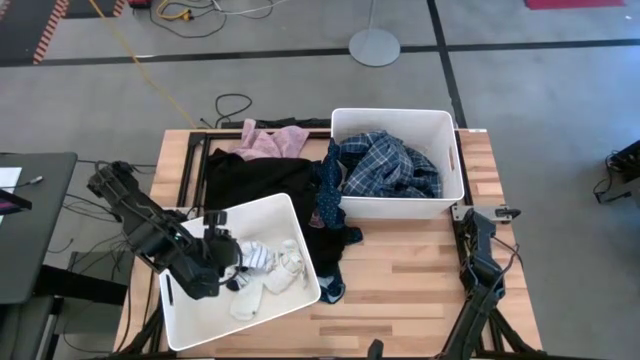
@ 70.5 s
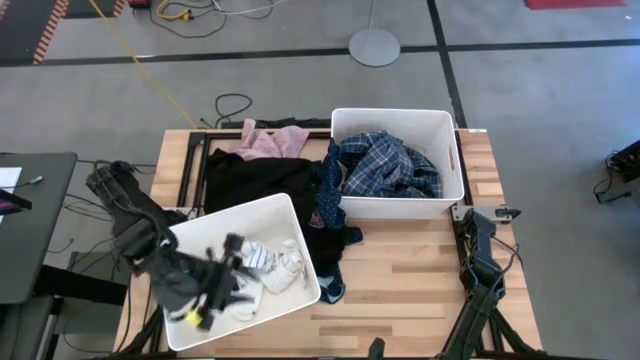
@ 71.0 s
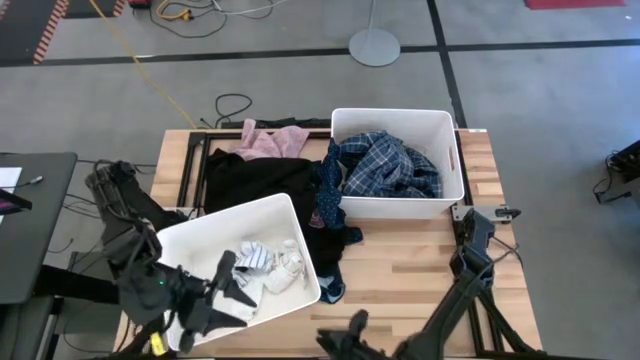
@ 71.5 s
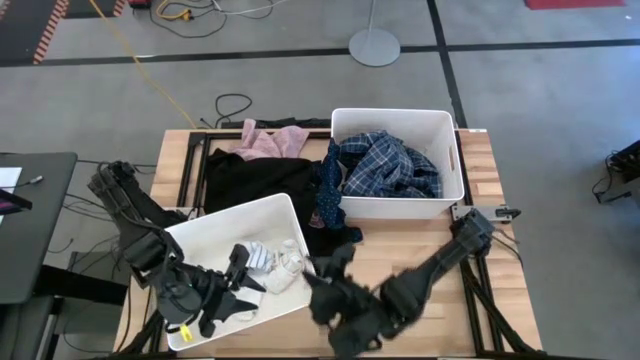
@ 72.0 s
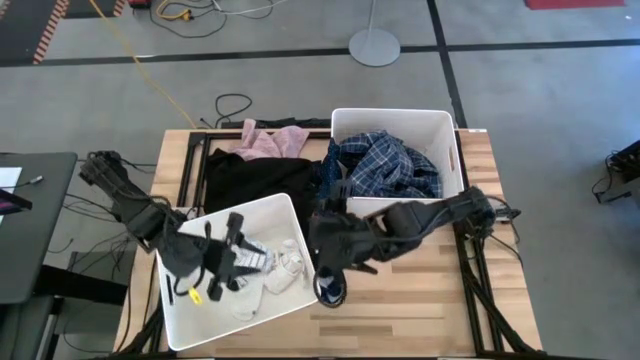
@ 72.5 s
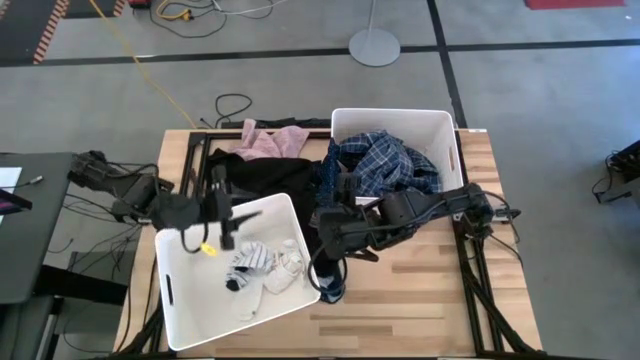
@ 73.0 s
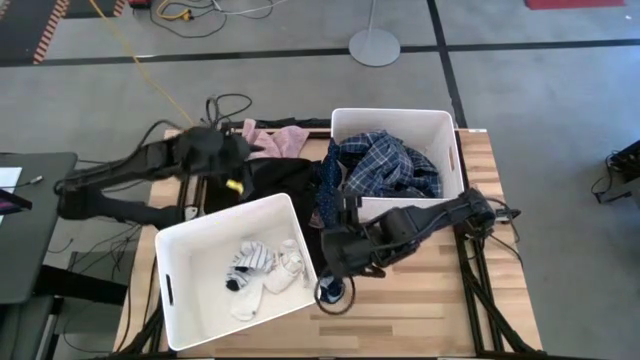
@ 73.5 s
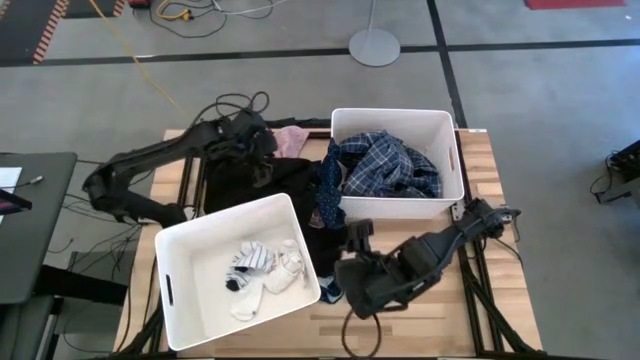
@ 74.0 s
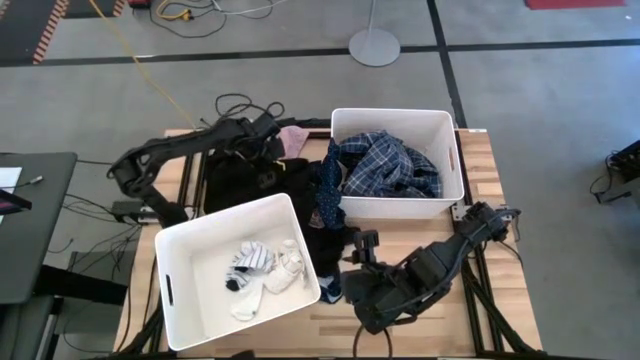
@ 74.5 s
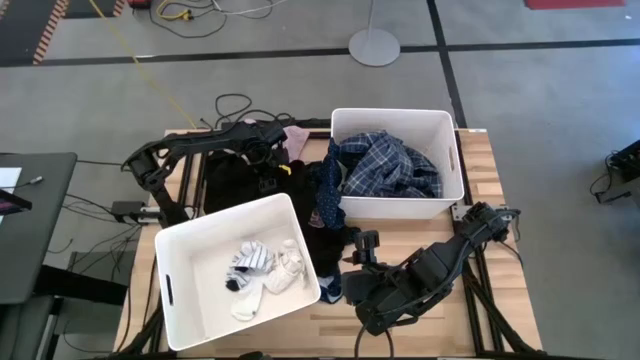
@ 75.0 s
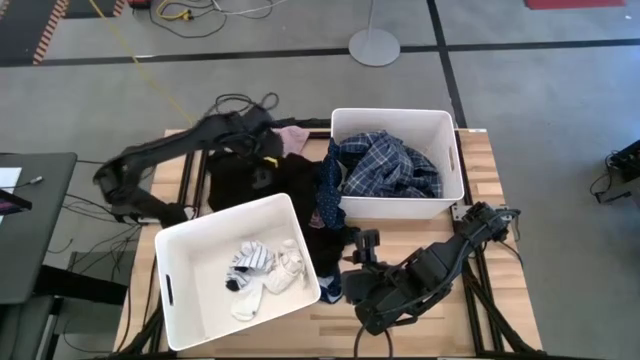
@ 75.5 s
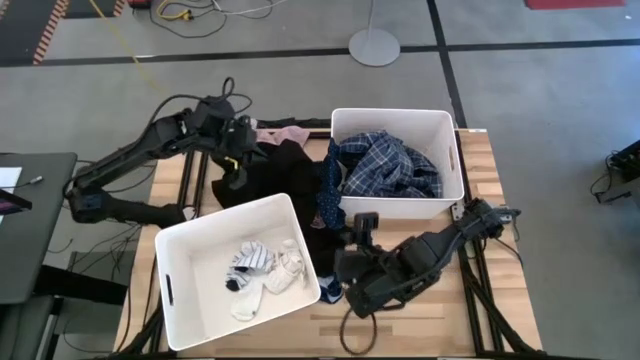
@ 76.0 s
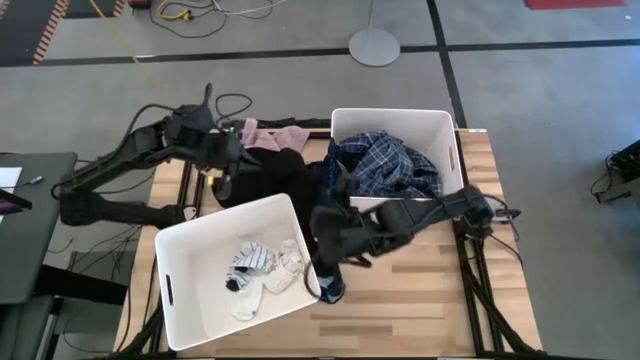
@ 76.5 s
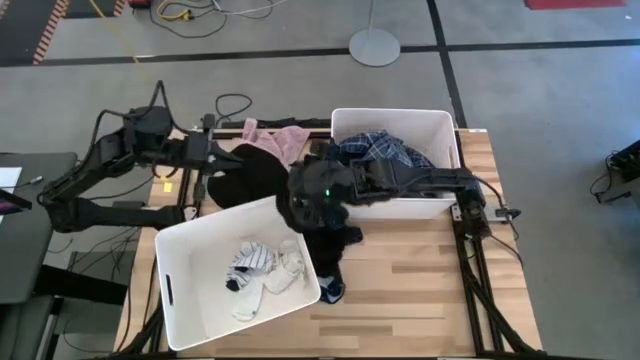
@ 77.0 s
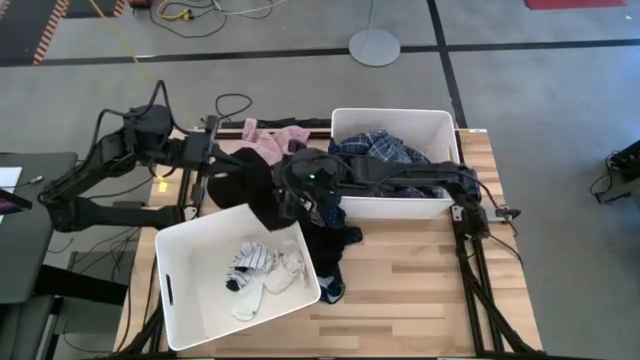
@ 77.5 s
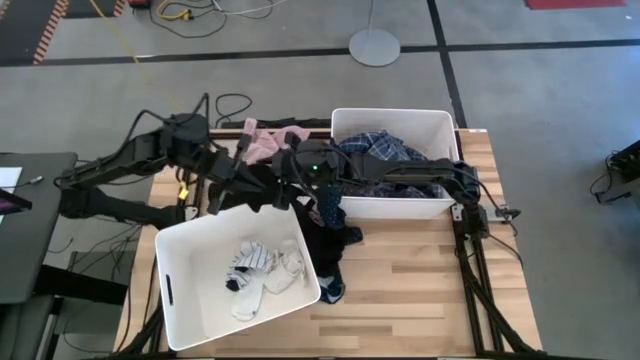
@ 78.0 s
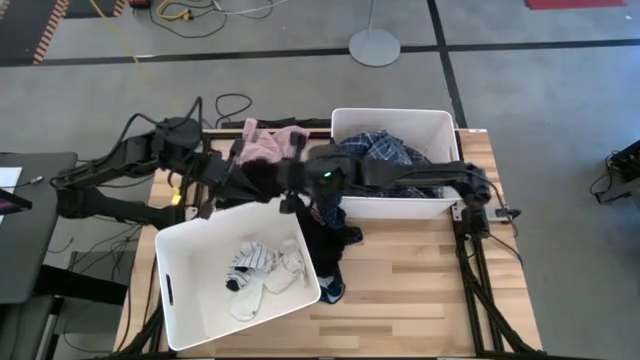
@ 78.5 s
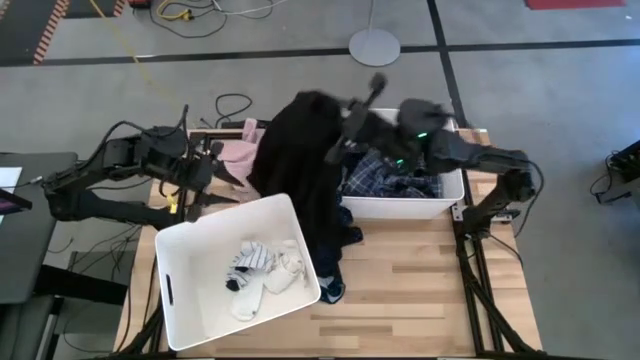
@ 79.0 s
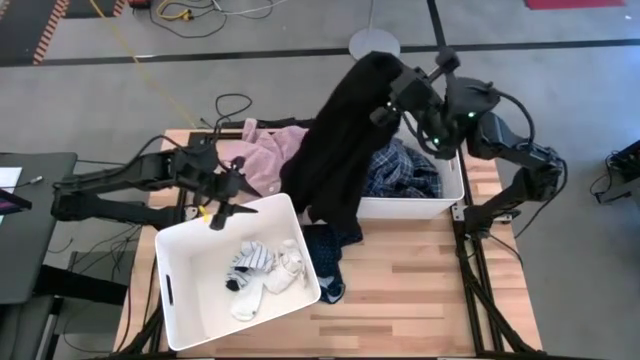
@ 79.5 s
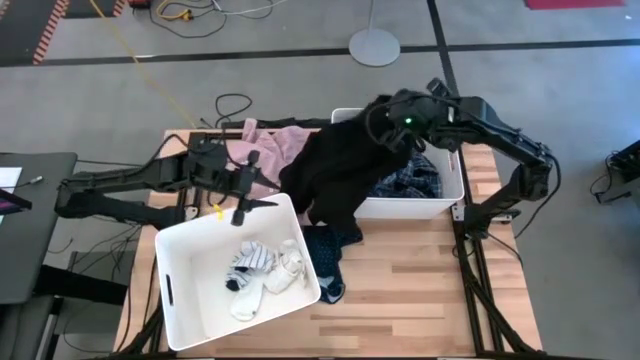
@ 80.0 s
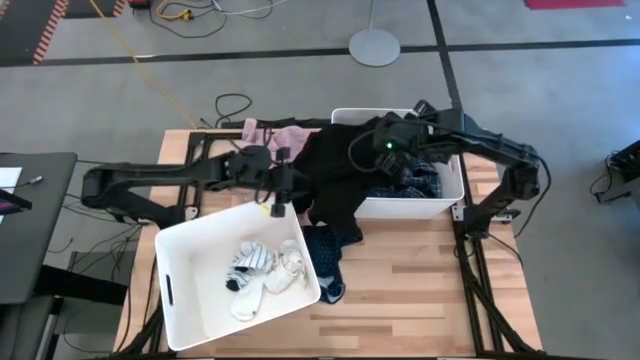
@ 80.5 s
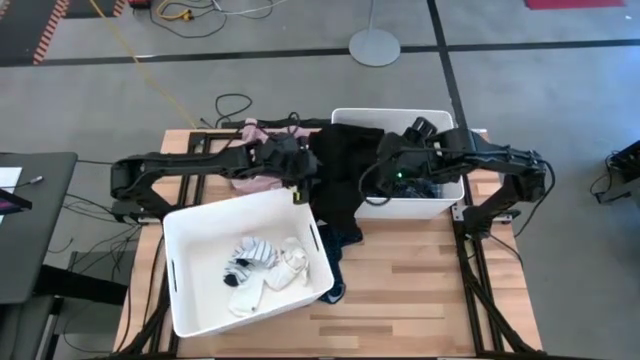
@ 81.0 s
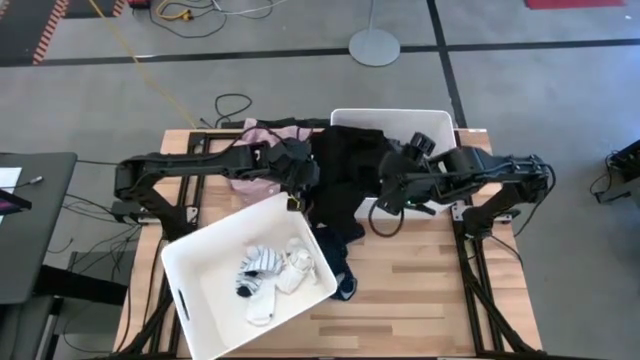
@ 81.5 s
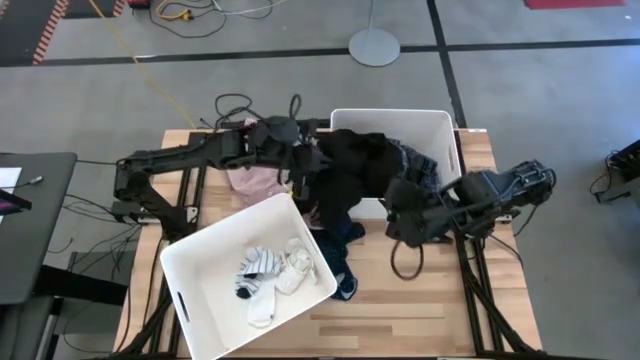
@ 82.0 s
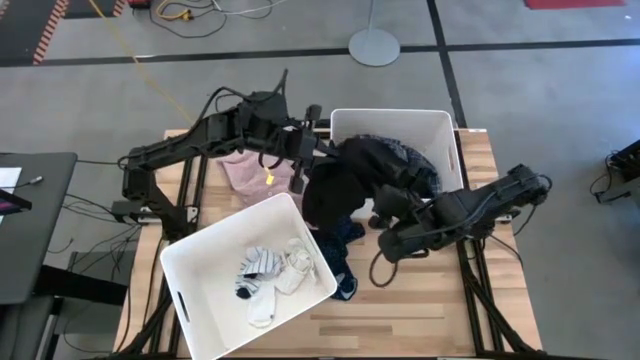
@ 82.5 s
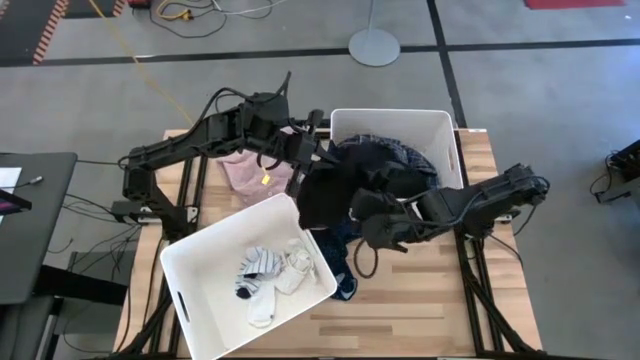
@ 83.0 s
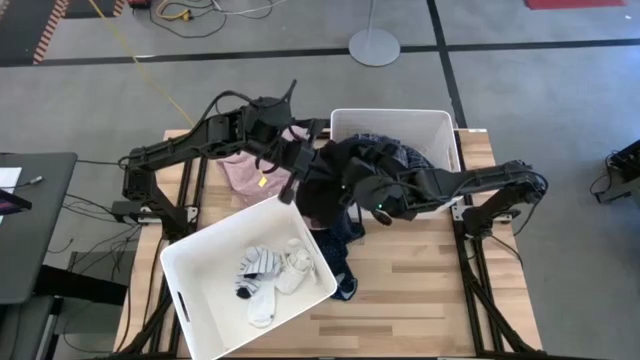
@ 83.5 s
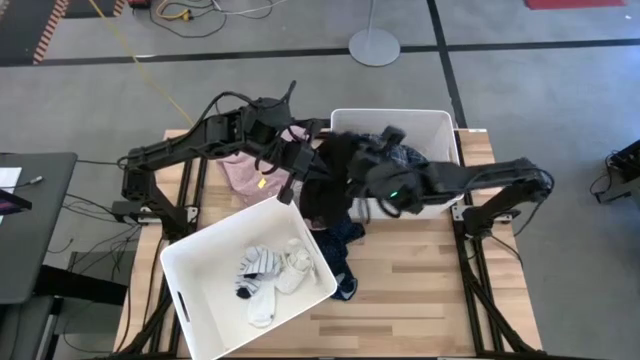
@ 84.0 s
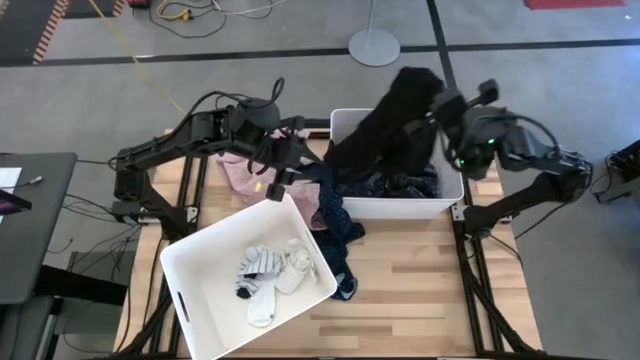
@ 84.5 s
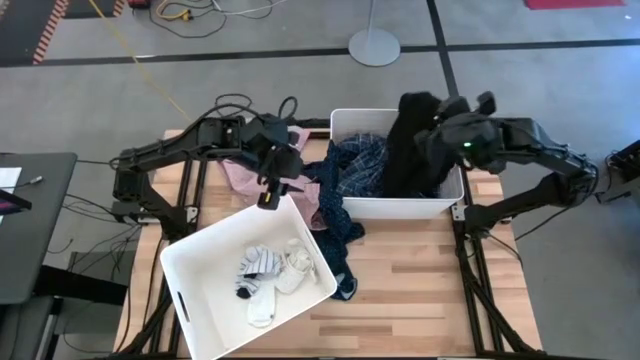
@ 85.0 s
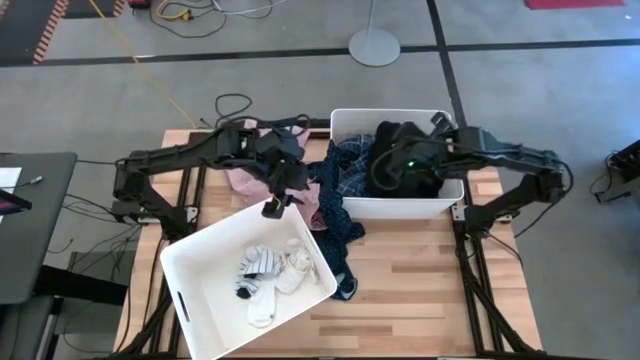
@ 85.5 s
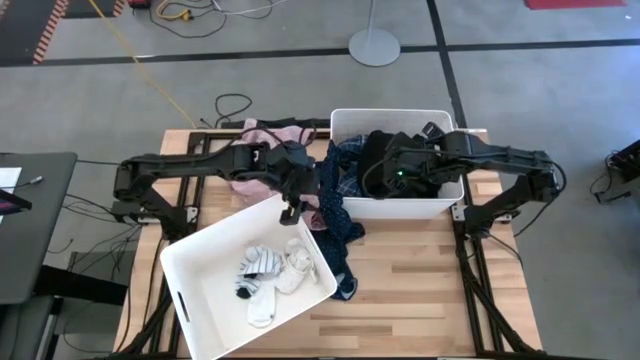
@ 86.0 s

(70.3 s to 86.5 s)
Task: Sort clothes
Put the black jacket into the top laundry bin

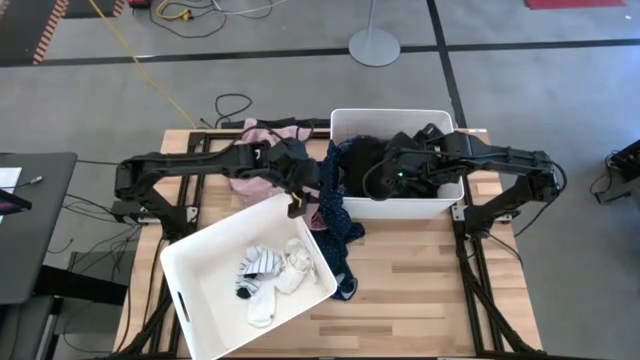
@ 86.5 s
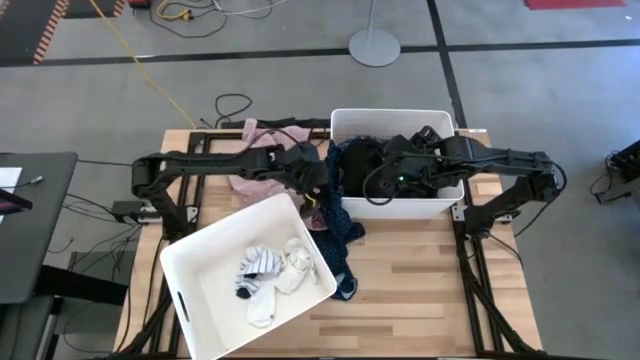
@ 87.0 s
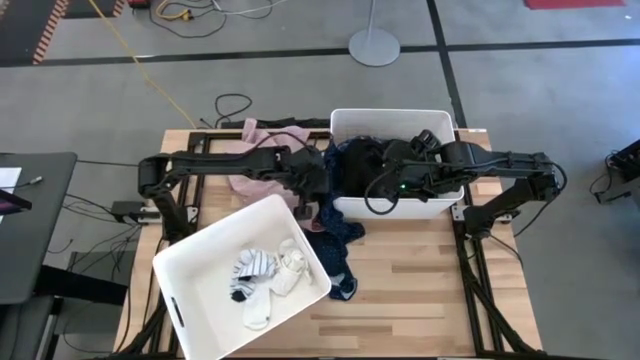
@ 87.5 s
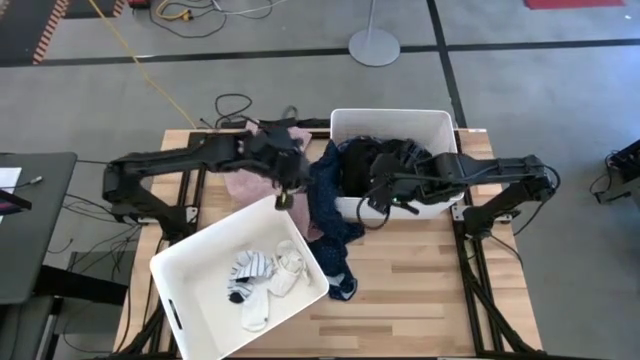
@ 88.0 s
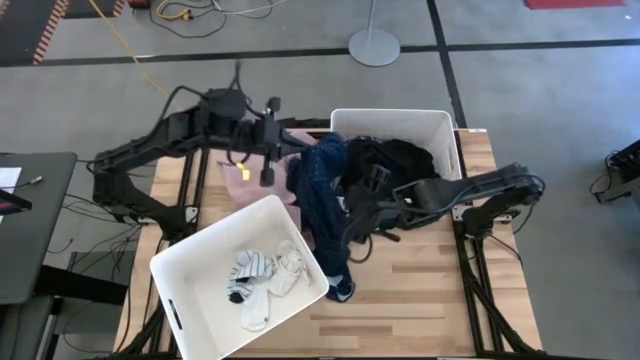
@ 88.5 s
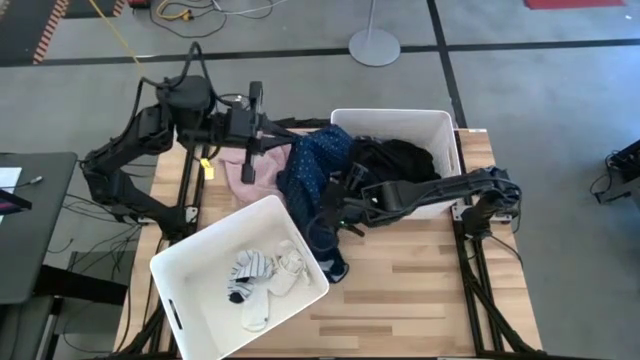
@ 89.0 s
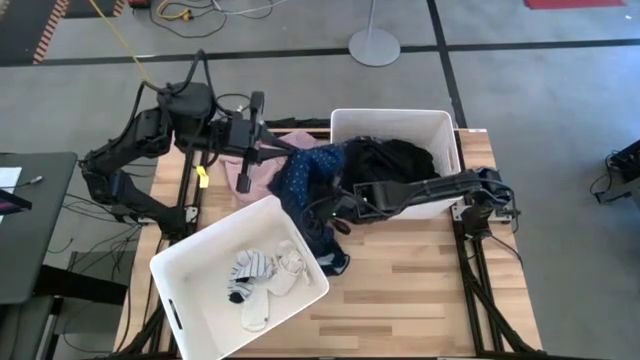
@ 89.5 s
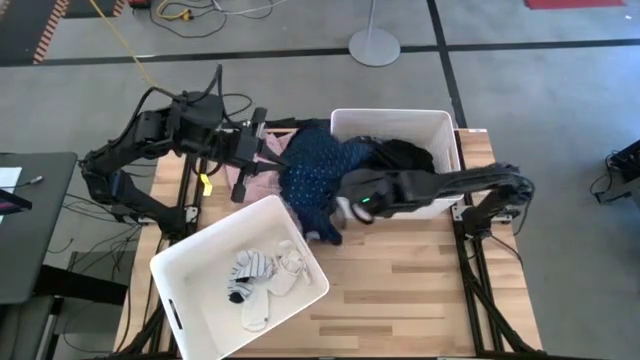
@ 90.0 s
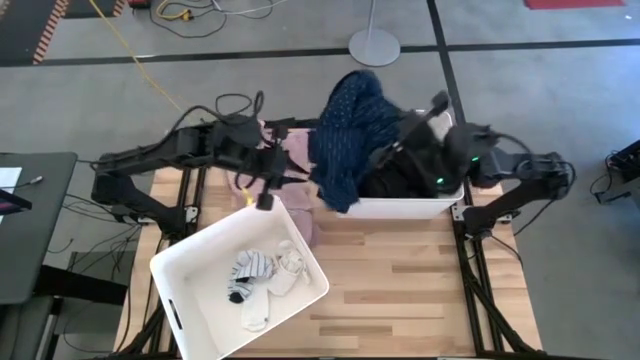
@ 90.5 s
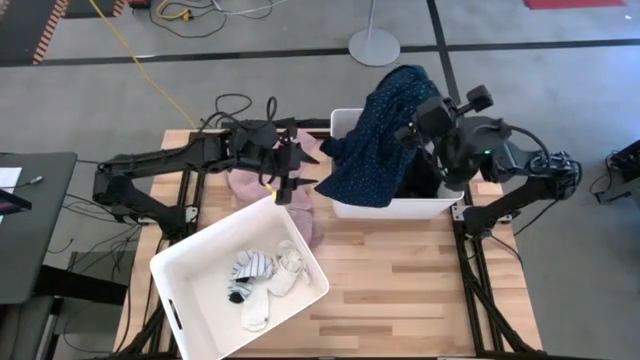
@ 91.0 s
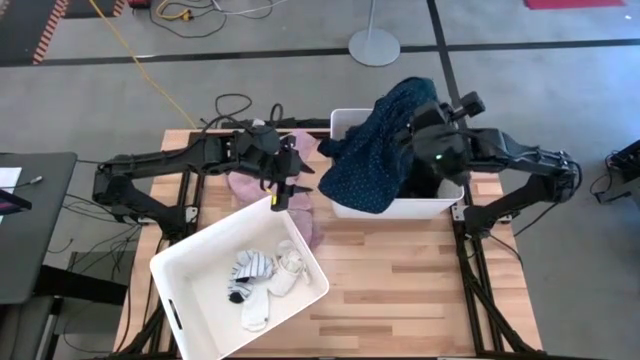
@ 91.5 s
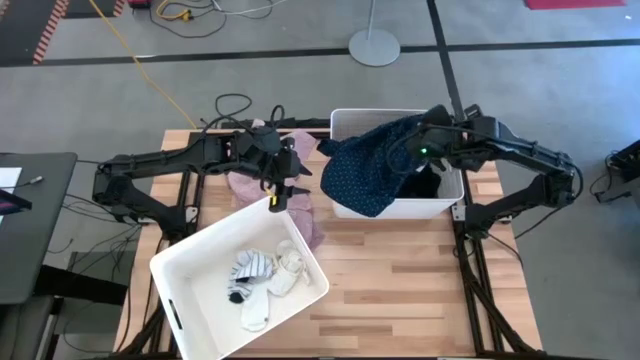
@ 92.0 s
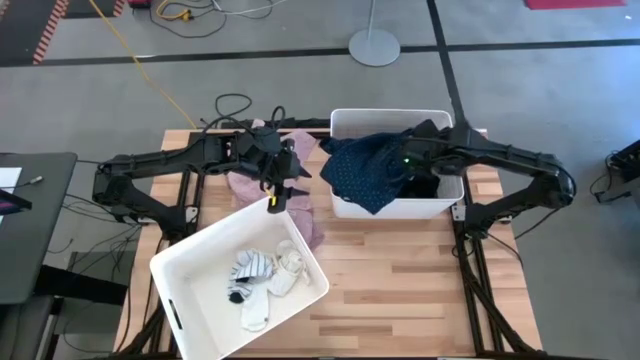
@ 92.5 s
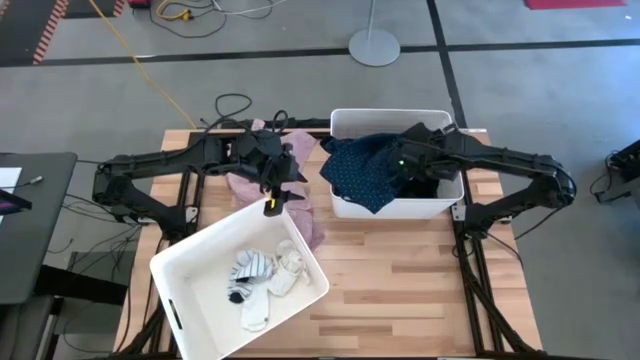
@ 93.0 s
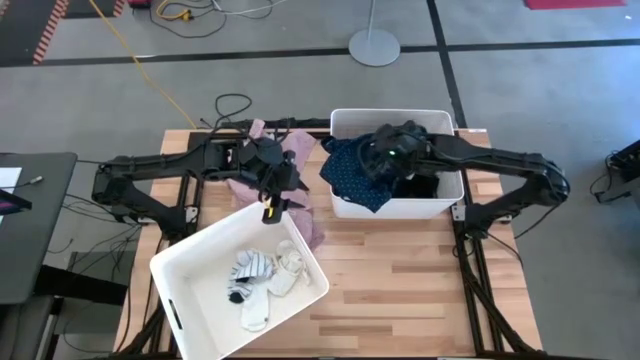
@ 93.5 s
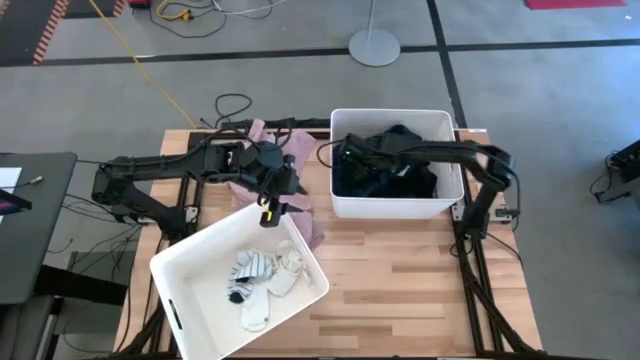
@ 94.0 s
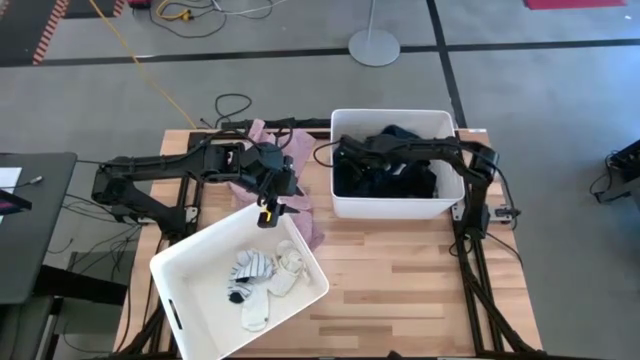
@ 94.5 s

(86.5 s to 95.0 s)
Put the blue long sleeve polo into the top laundry bin
